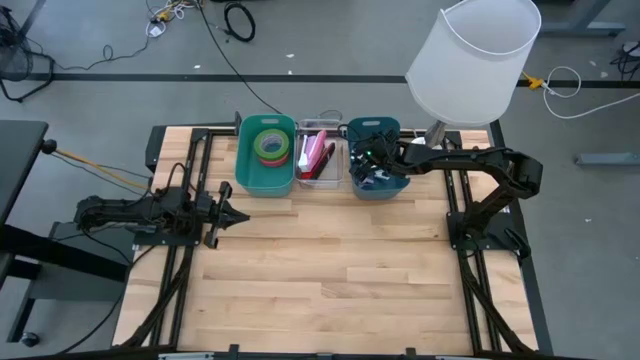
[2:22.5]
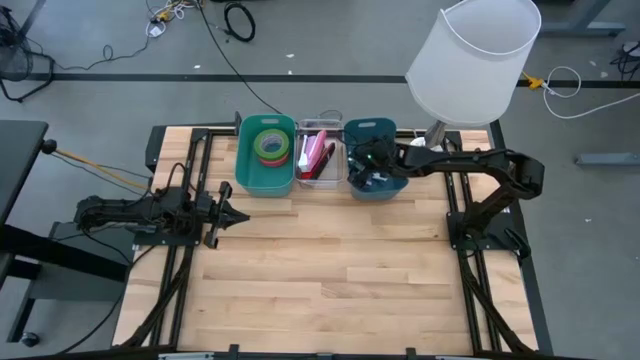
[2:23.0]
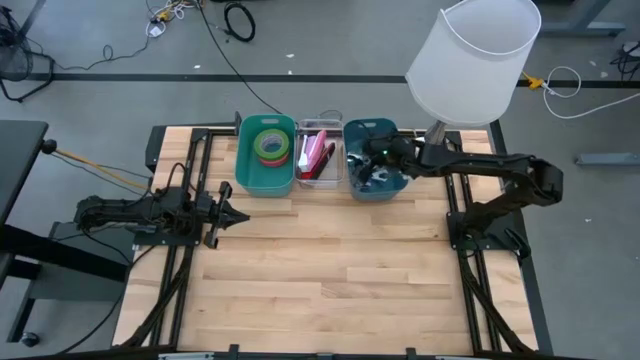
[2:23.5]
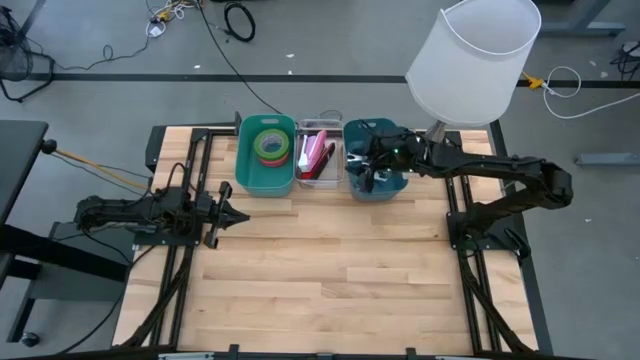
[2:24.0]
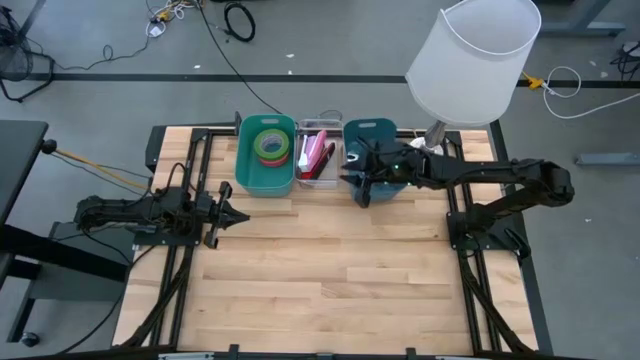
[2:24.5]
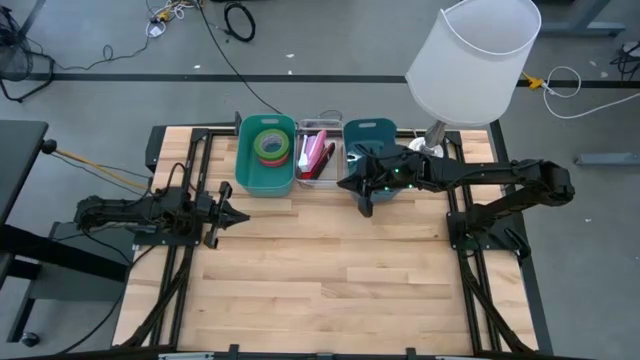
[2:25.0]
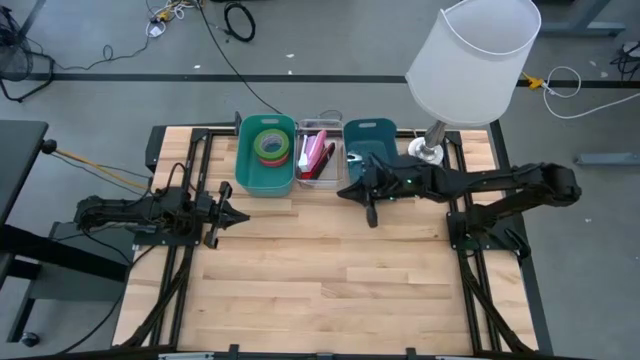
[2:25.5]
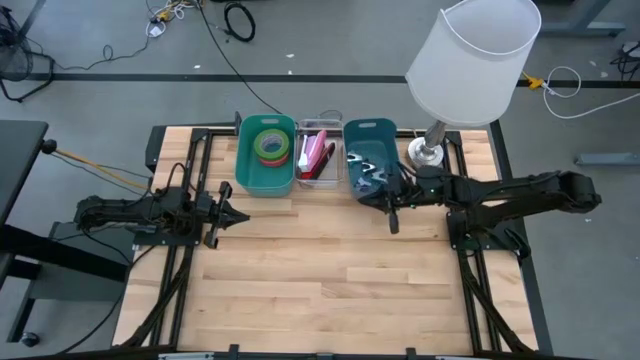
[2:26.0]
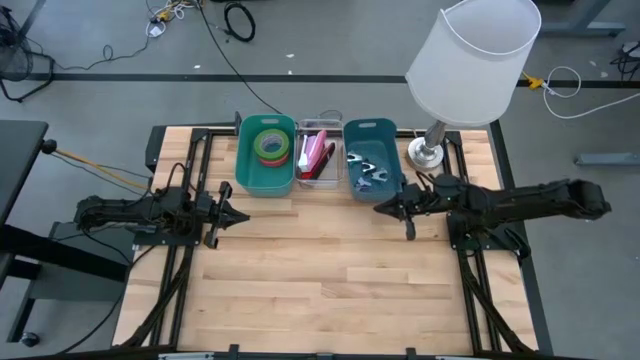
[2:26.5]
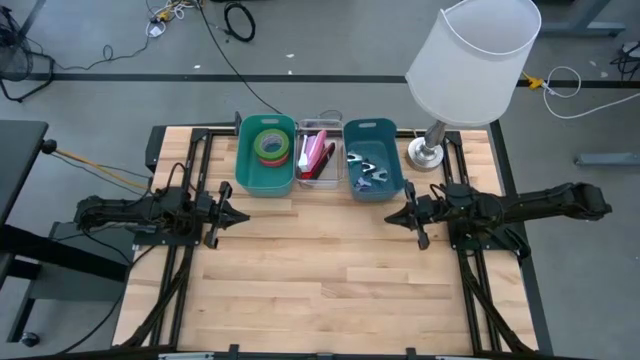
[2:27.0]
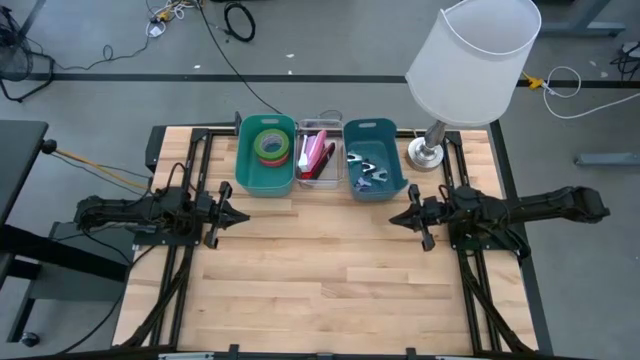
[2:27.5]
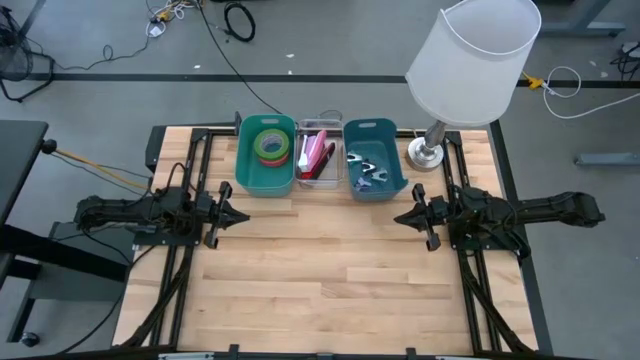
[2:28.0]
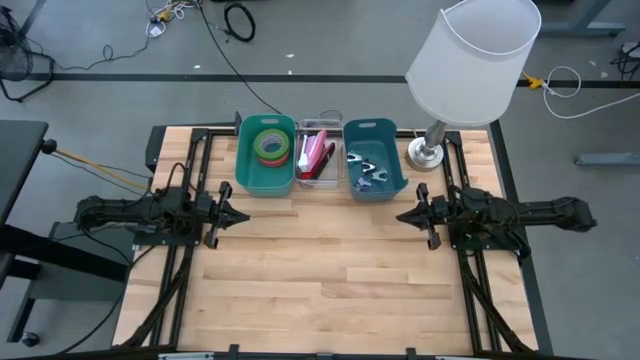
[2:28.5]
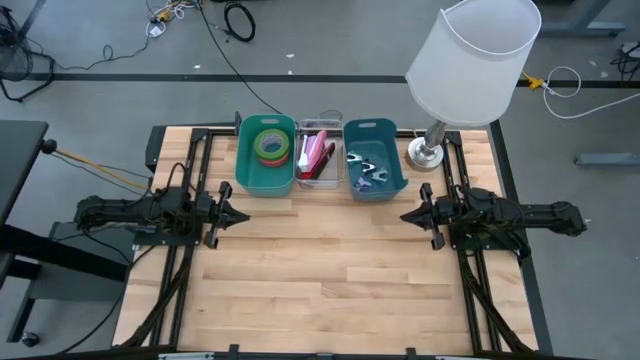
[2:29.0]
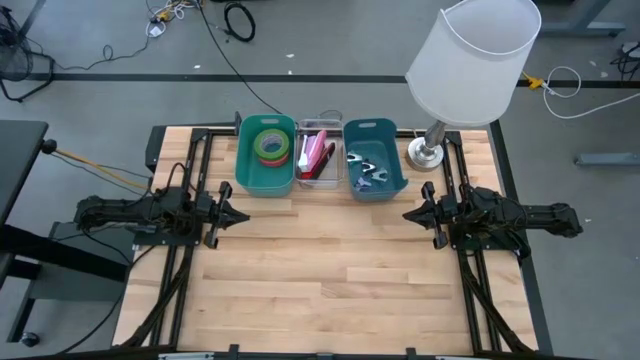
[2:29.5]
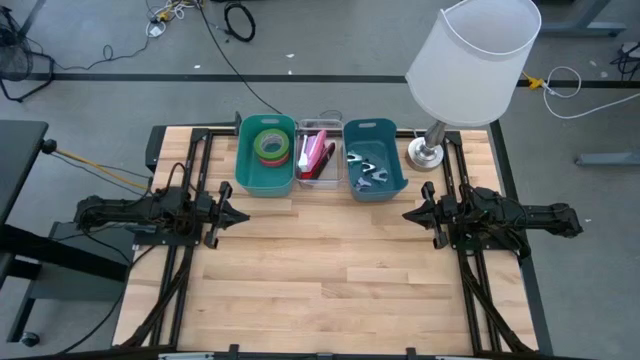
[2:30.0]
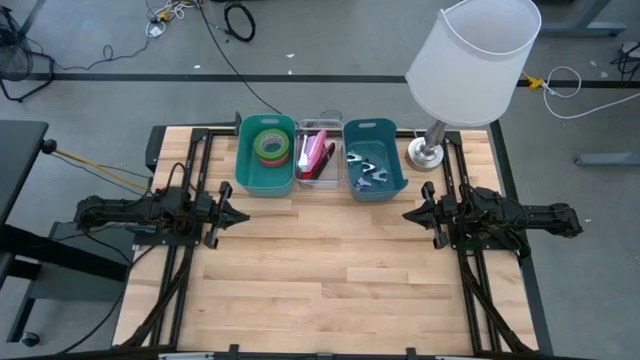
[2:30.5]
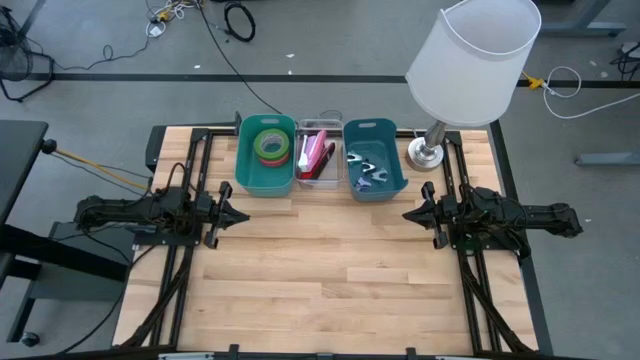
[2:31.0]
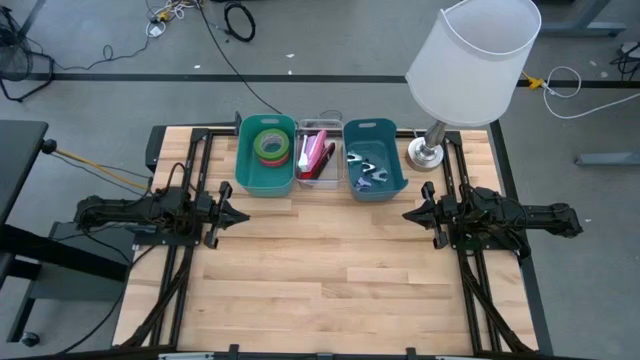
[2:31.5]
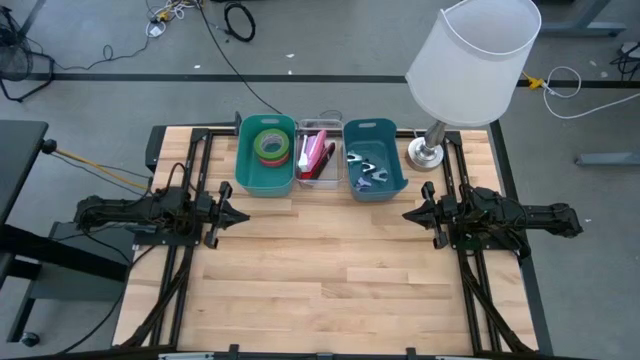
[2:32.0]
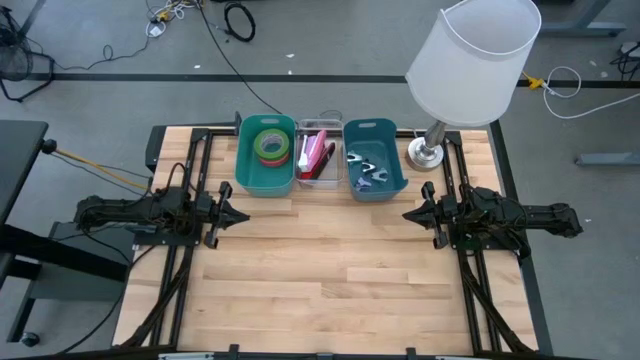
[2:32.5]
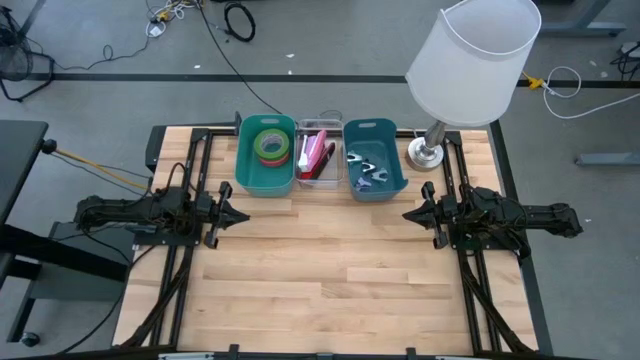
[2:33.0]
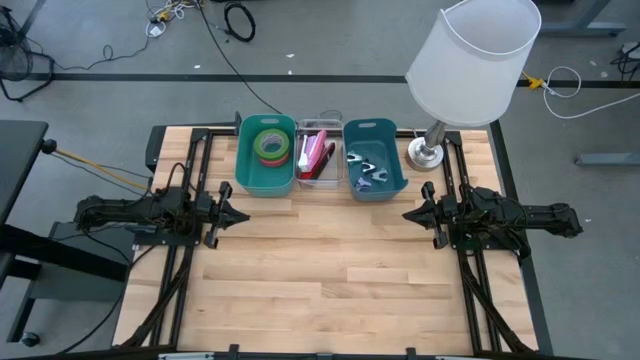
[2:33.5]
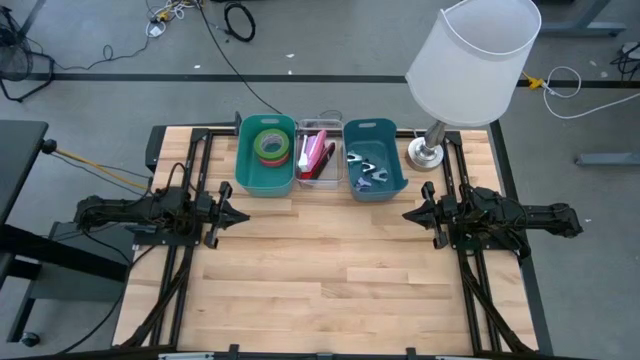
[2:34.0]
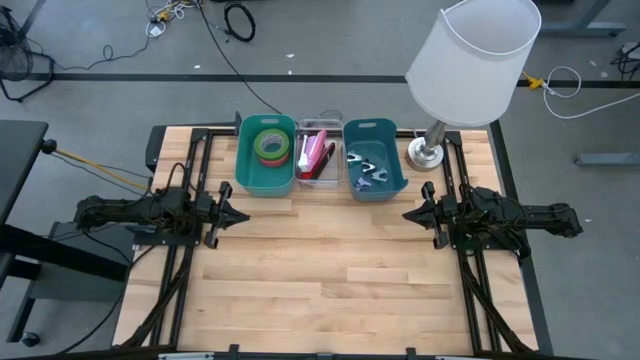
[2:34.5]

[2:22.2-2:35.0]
Task: Pick and place Stapler, Stapler remover, tape
Return to Home Position

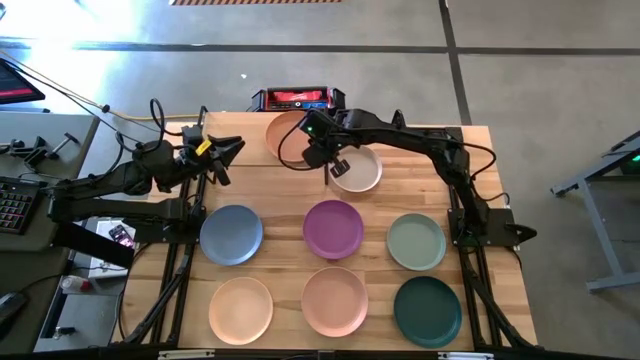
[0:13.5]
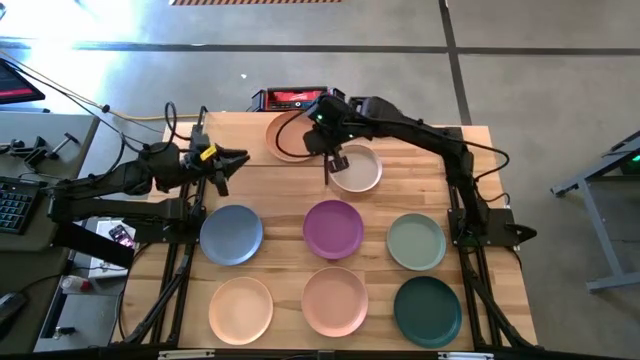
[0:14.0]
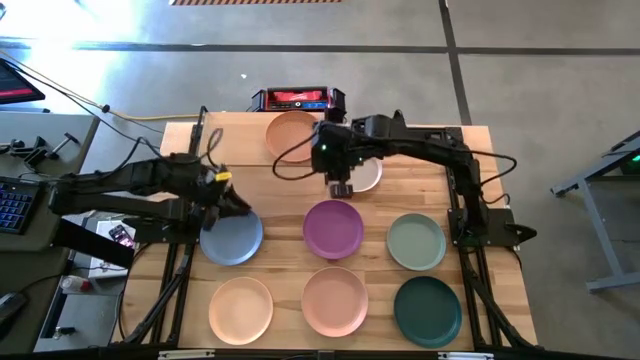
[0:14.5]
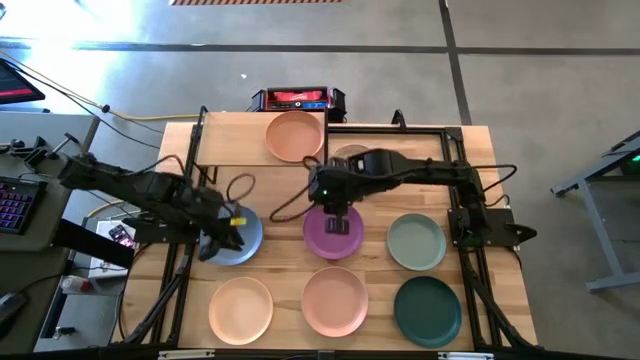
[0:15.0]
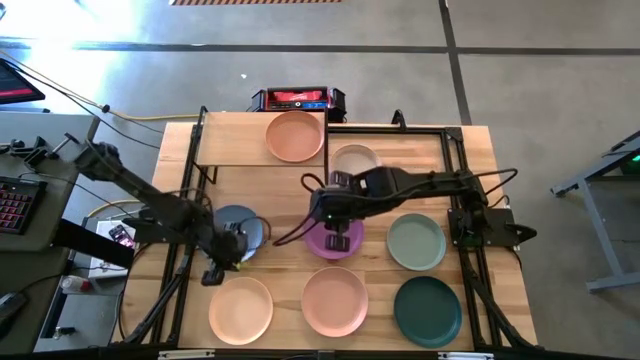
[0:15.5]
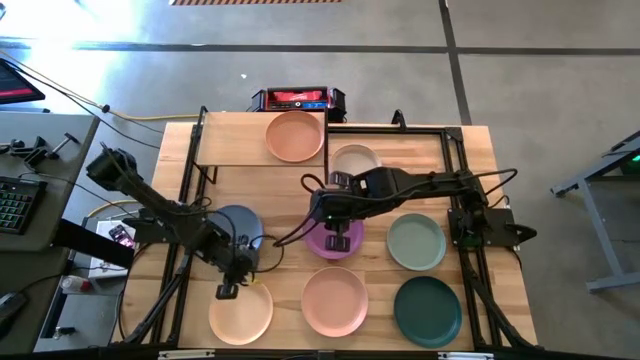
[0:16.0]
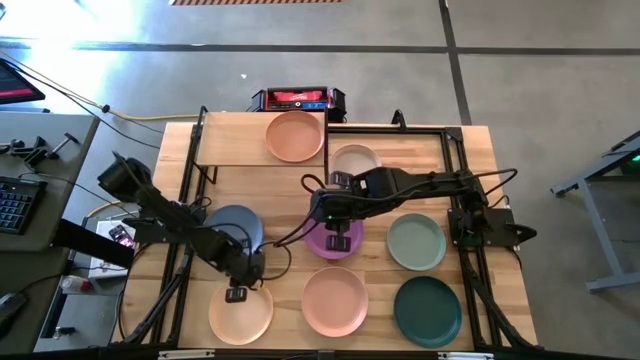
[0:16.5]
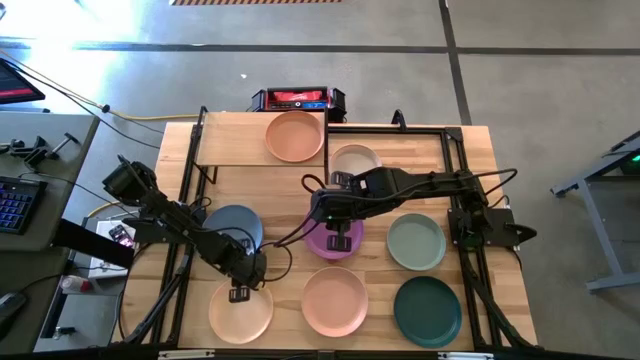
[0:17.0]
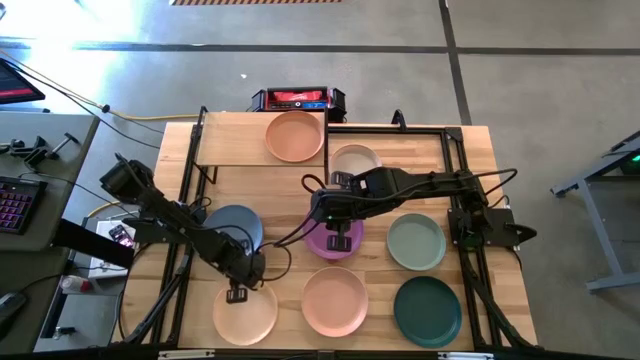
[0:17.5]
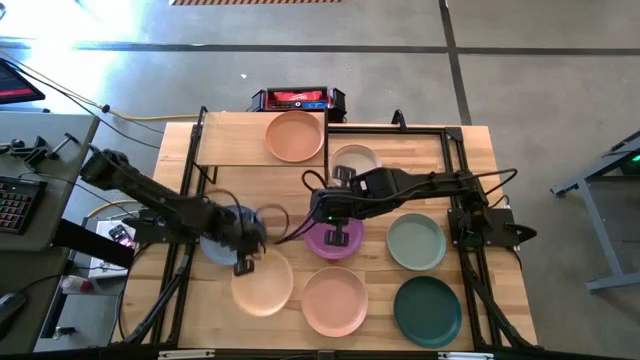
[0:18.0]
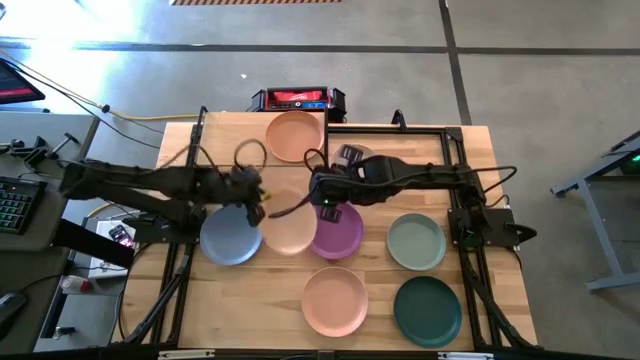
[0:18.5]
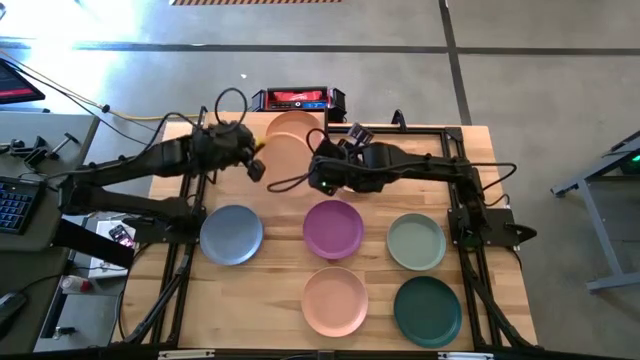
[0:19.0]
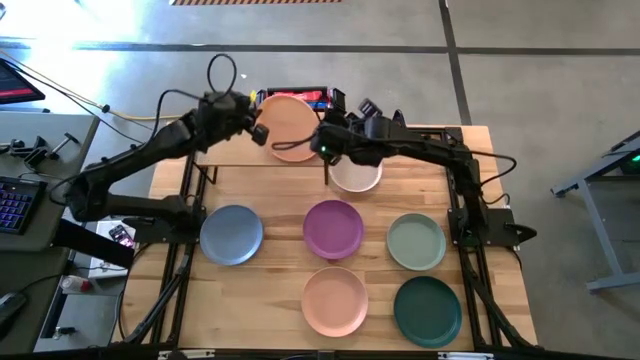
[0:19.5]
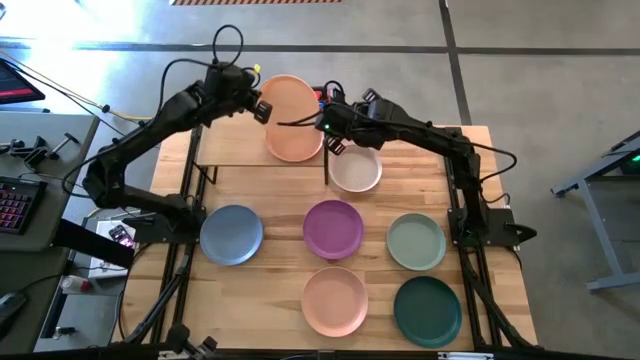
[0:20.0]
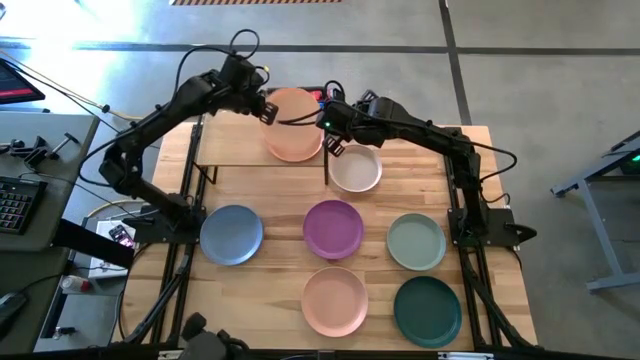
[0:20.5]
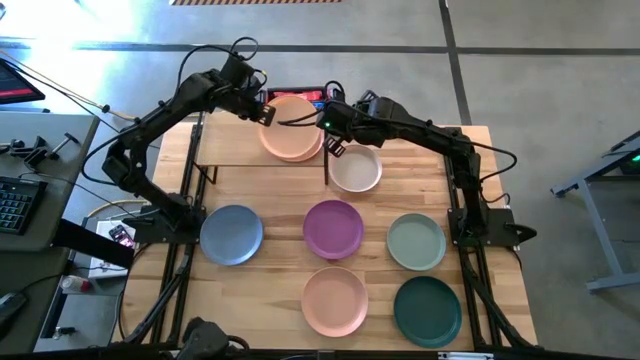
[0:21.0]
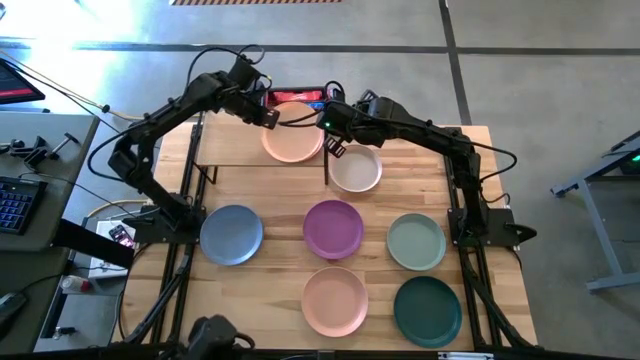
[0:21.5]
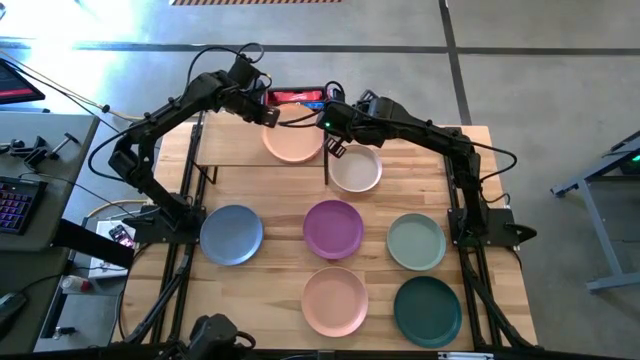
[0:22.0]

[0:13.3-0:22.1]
Task: Place and stack plates onto a shelf
Stack the light orange plate on top of the orange plate on the shelf
